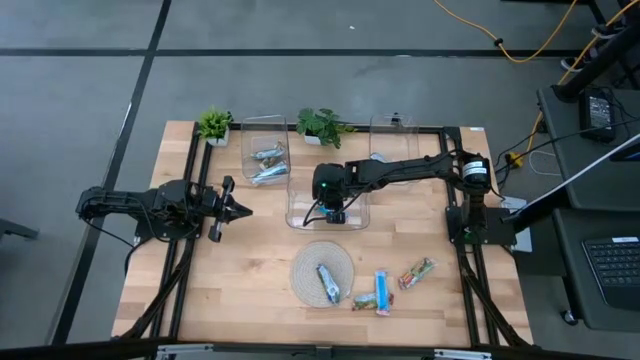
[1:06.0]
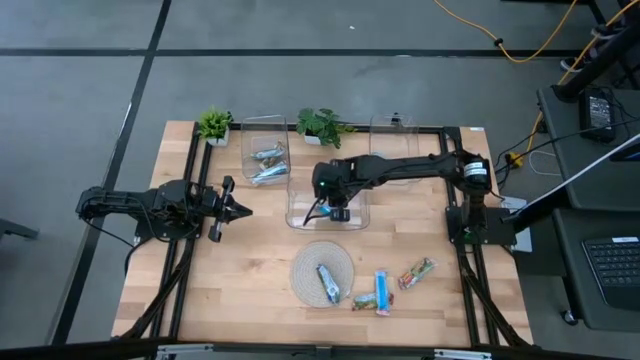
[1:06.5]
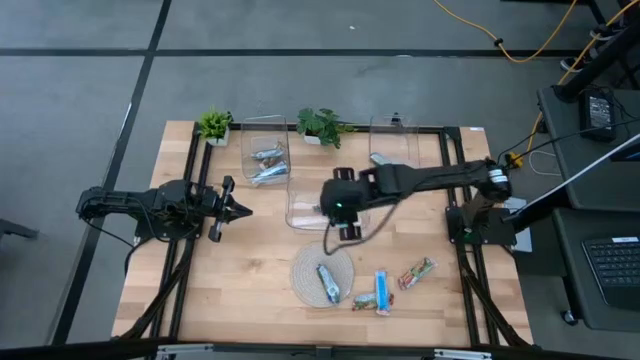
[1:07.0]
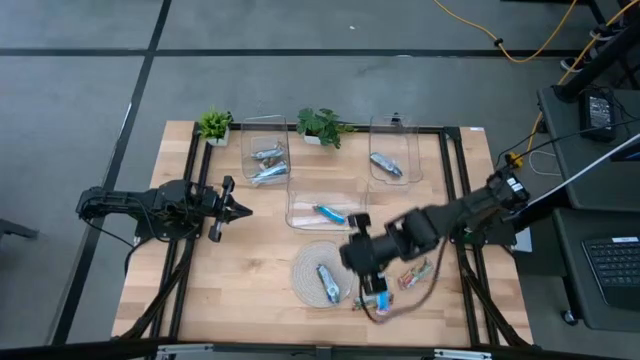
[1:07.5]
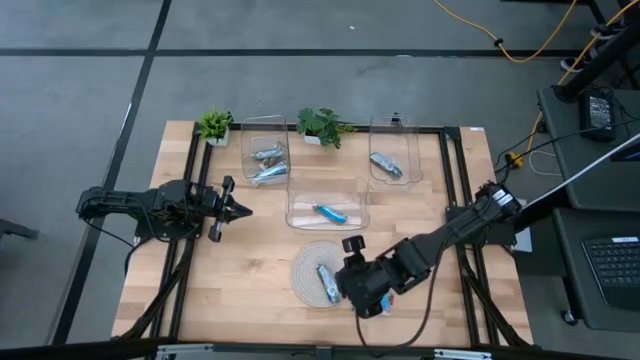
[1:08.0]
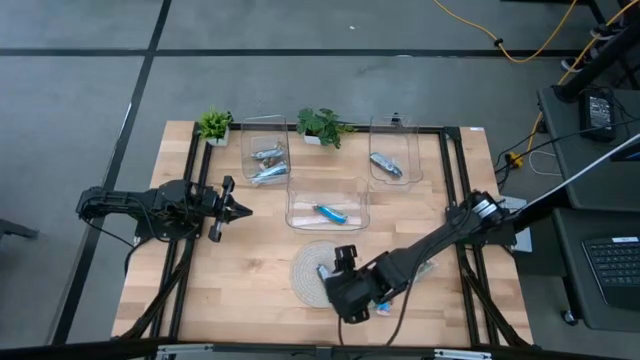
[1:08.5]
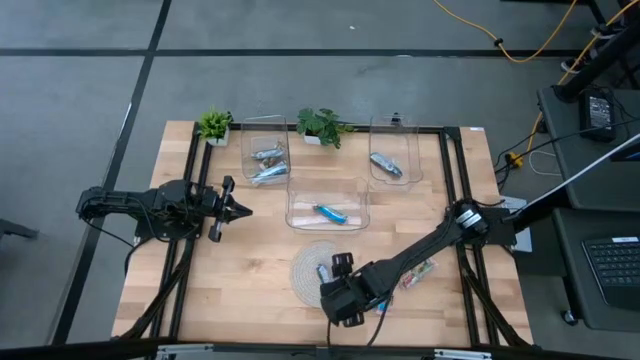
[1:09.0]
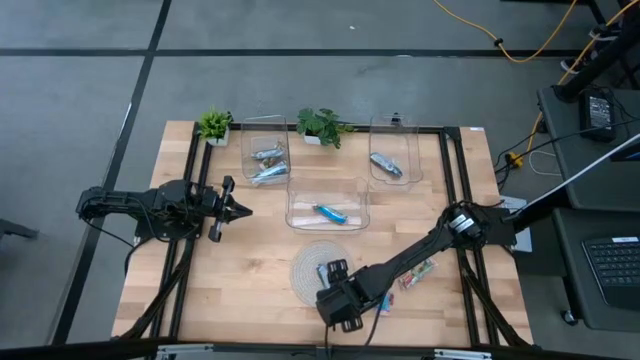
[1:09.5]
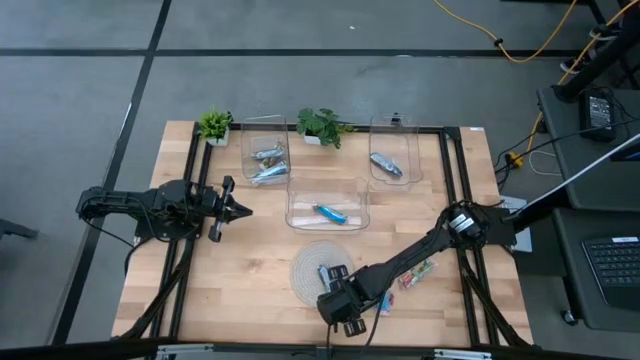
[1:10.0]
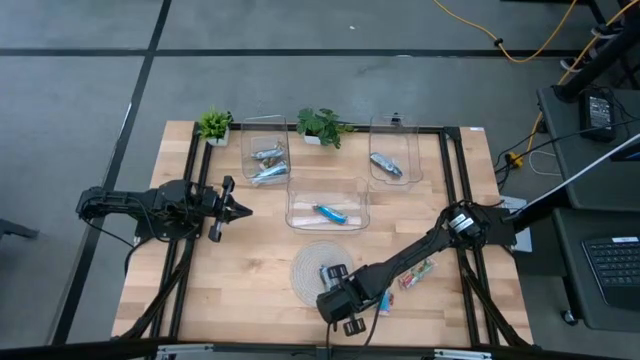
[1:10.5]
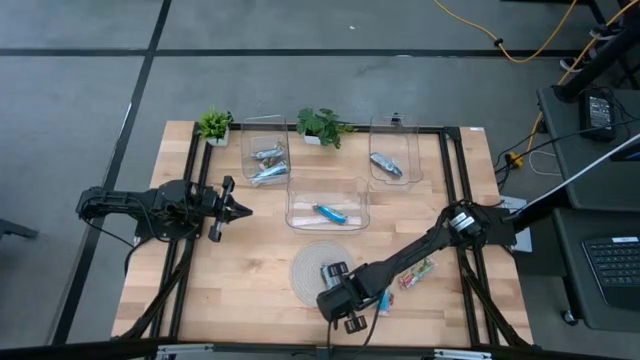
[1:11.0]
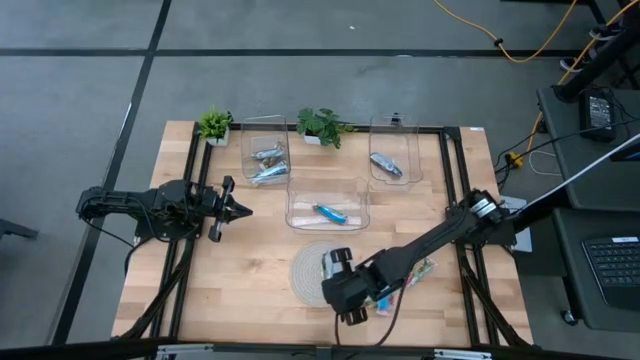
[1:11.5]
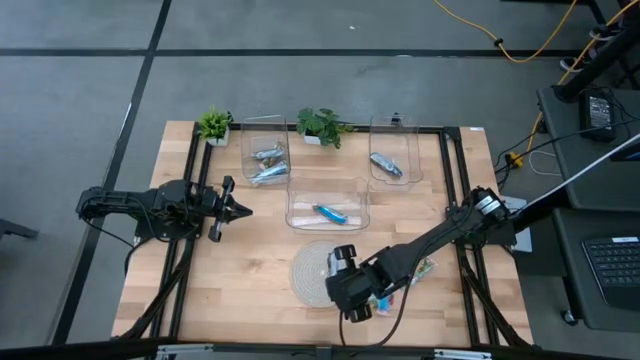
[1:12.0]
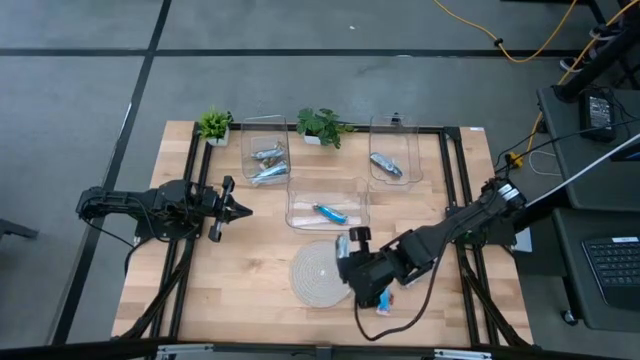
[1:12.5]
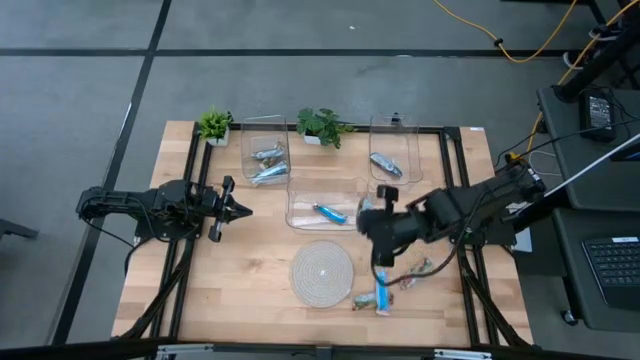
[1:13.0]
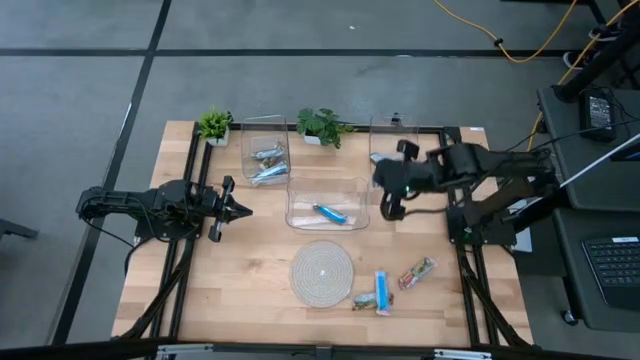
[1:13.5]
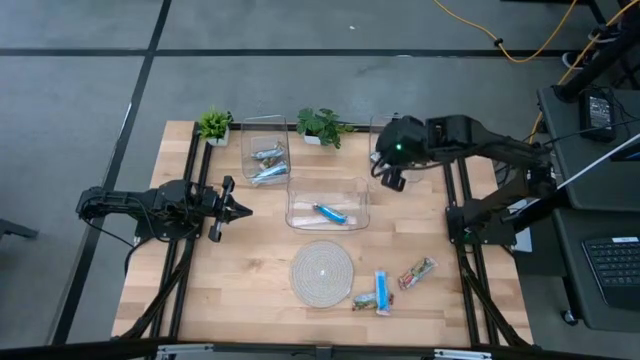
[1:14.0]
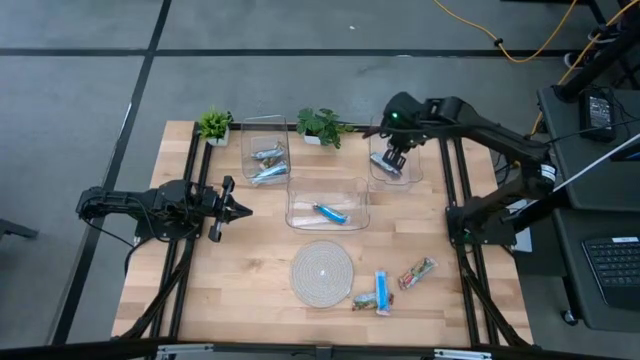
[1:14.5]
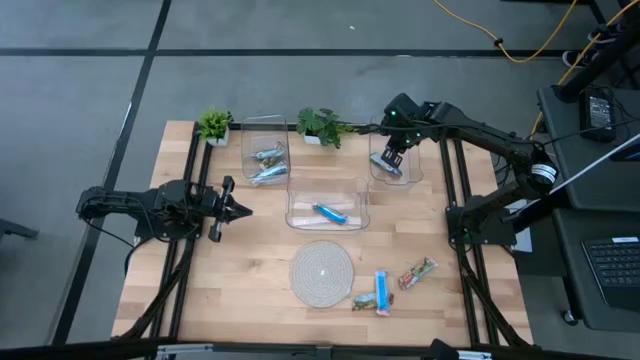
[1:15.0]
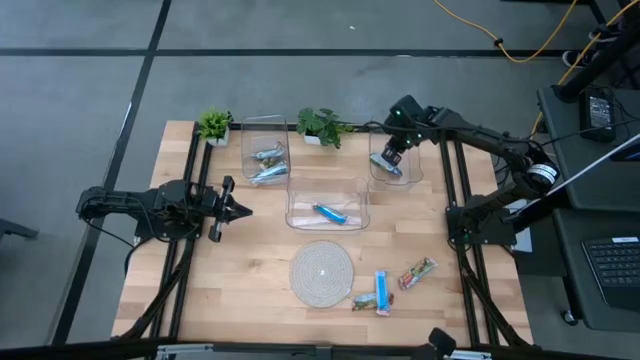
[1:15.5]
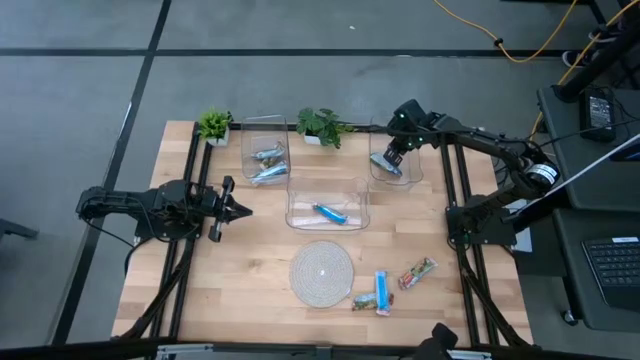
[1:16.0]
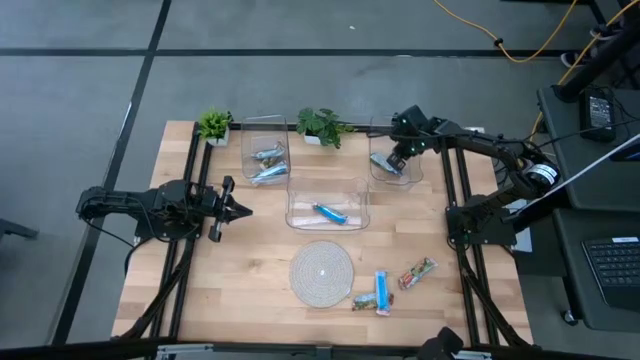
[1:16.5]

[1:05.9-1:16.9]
Task: Pick and place Granola Bars by type
Put the blue granola bar into the top right transparent bin

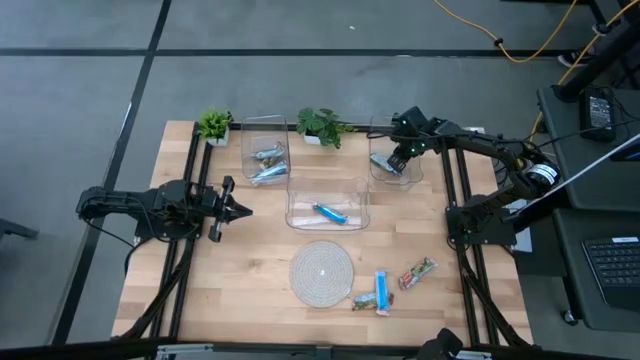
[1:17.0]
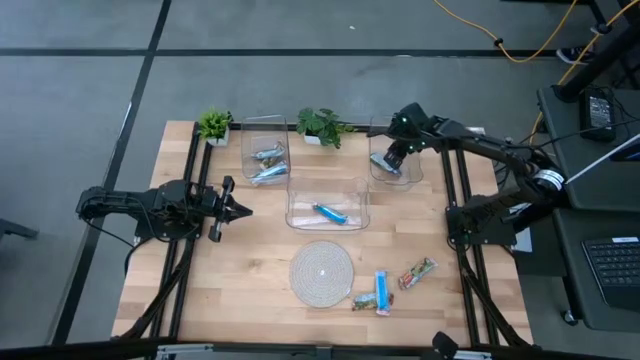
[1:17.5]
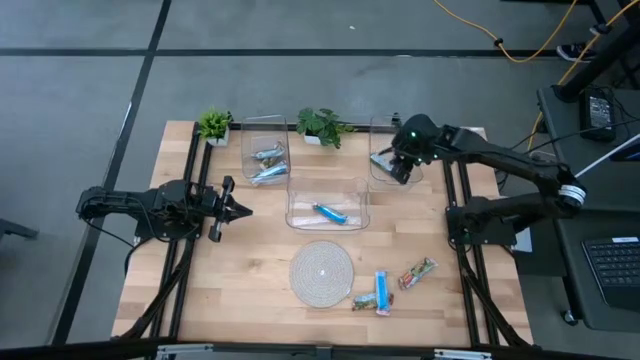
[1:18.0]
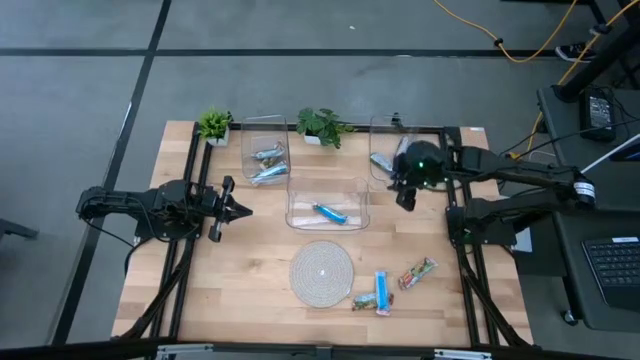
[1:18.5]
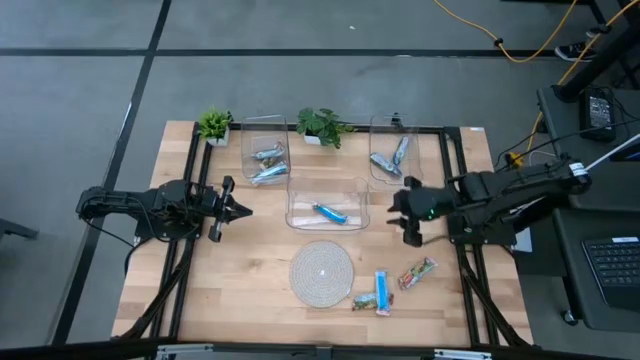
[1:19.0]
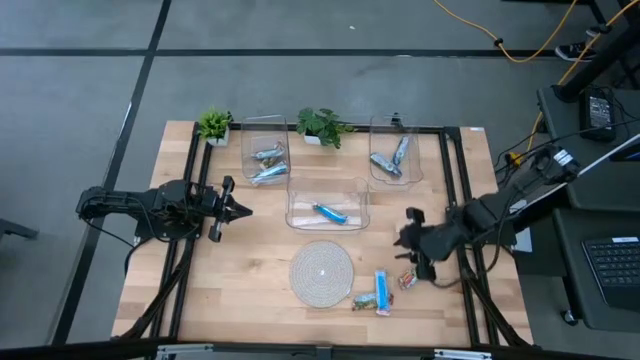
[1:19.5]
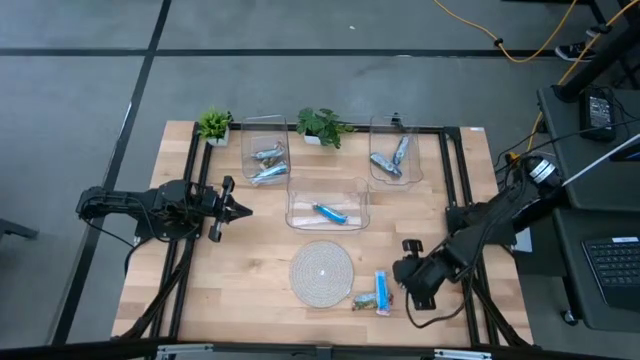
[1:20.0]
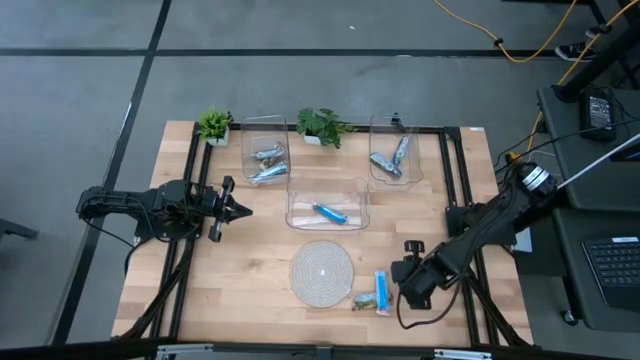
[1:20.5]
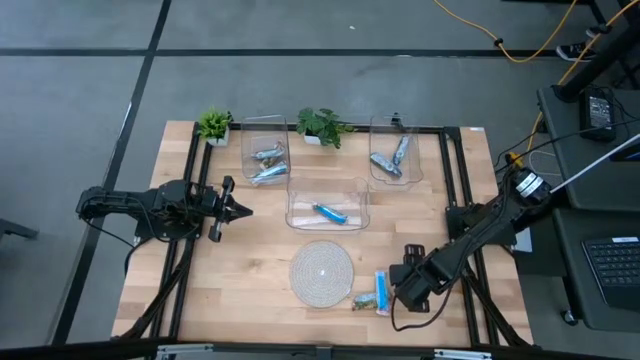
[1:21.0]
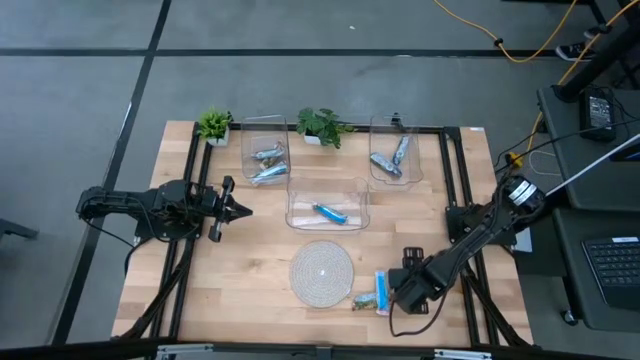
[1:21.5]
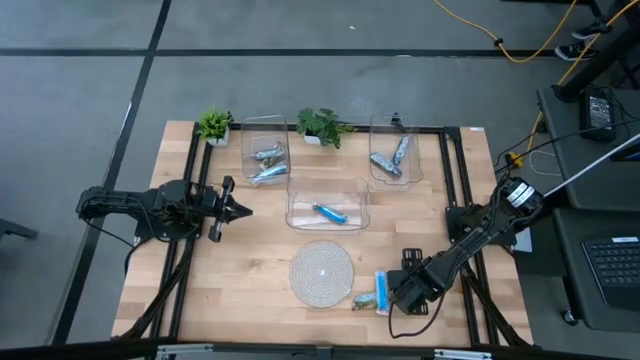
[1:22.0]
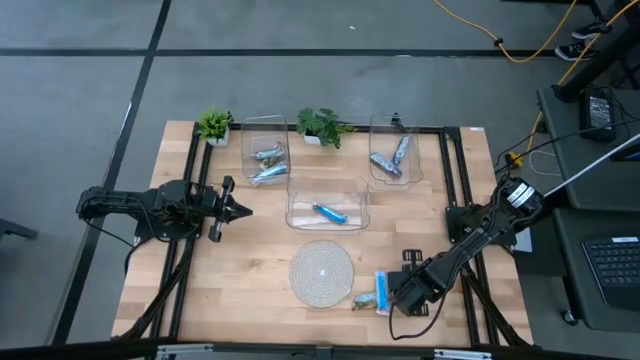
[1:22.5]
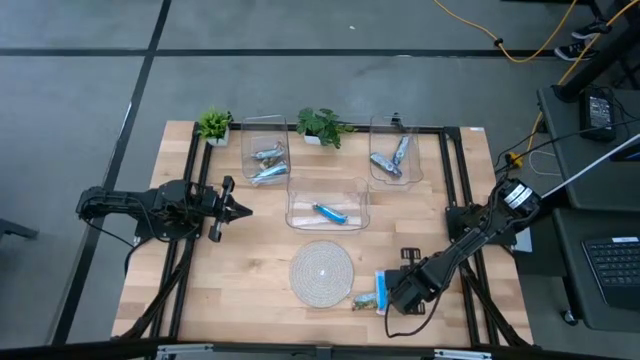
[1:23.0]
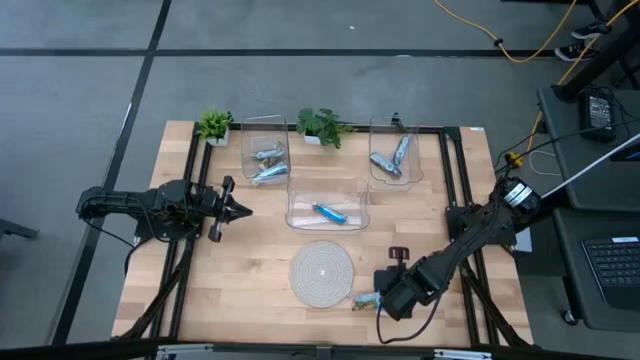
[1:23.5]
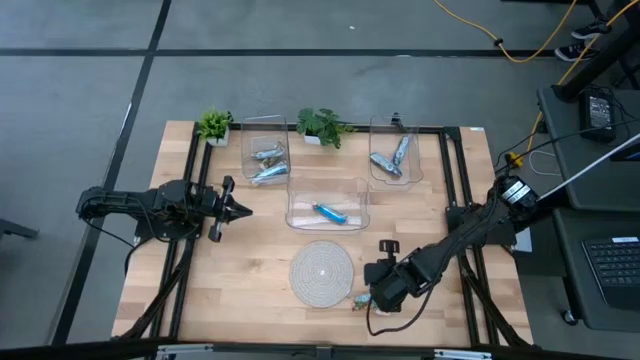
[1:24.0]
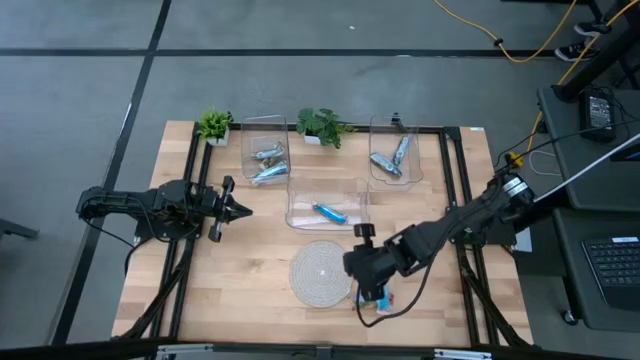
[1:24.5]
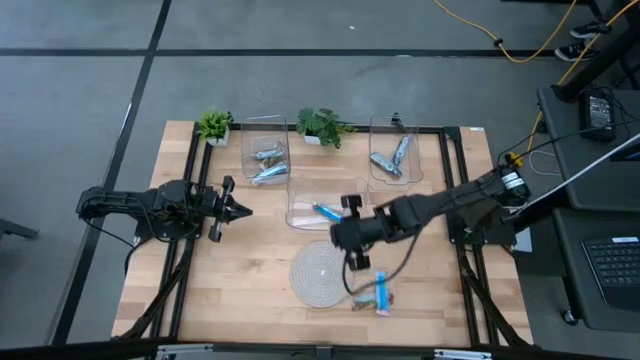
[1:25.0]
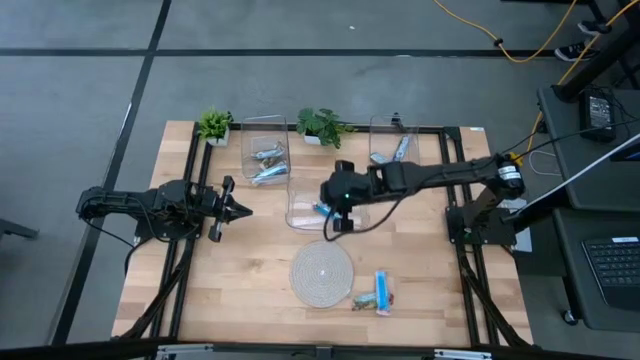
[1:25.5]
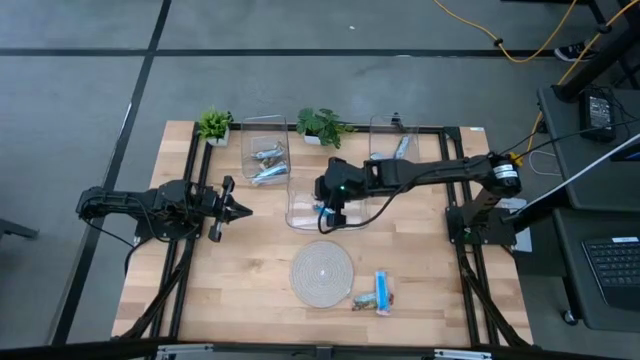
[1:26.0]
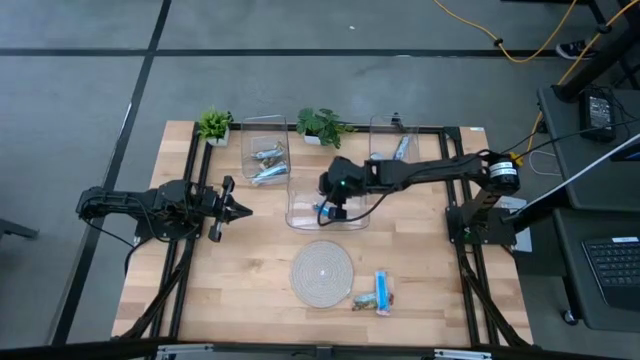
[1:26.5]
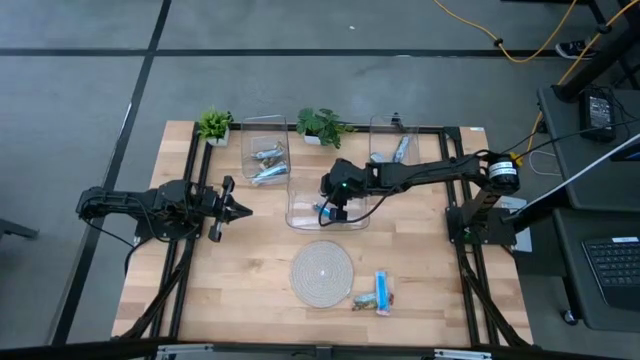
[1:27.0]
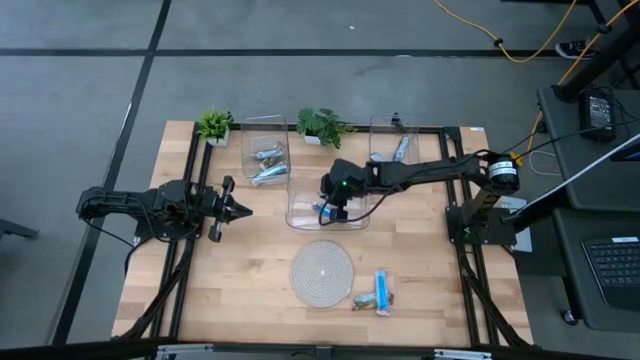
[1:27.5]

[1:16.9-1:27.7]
Put the red granola bar into the bottom transparent bin
